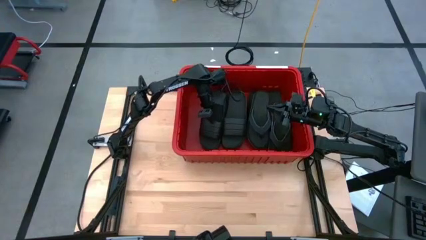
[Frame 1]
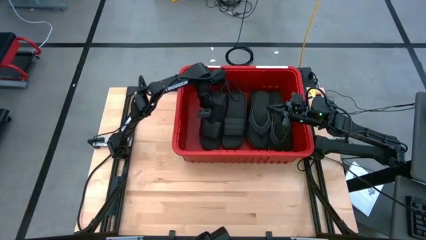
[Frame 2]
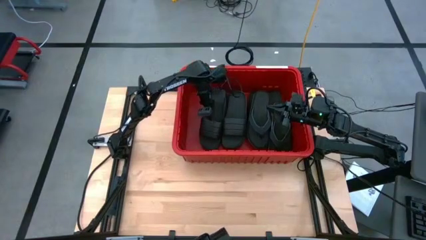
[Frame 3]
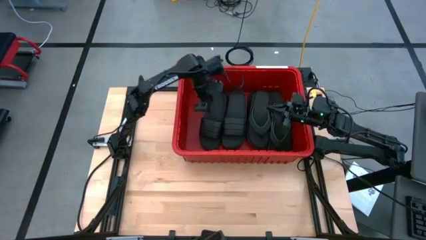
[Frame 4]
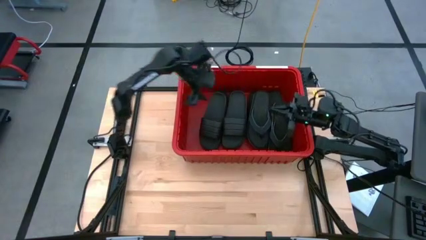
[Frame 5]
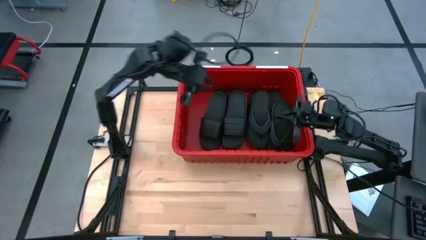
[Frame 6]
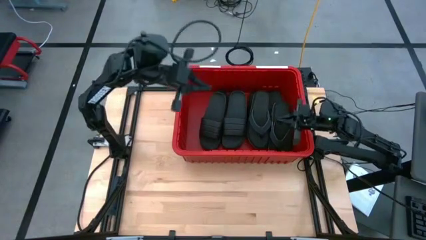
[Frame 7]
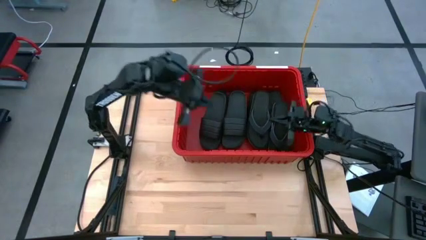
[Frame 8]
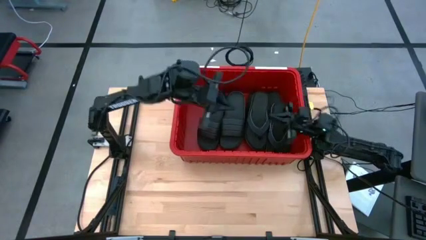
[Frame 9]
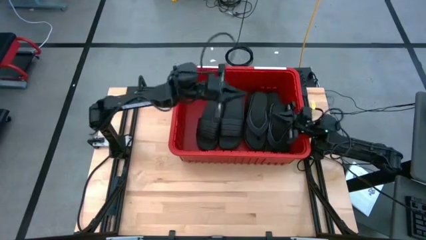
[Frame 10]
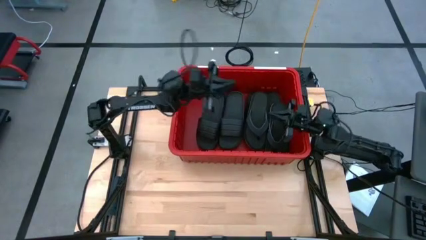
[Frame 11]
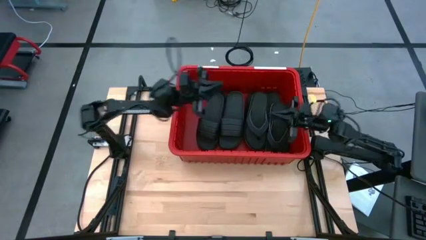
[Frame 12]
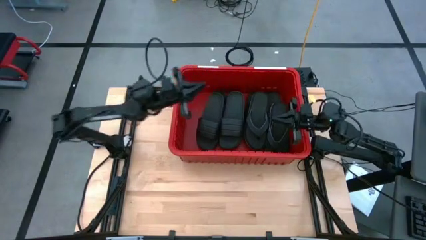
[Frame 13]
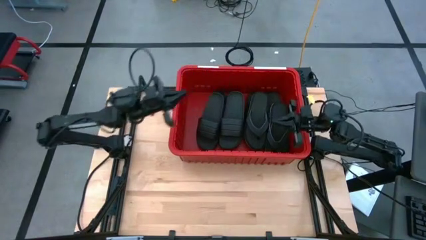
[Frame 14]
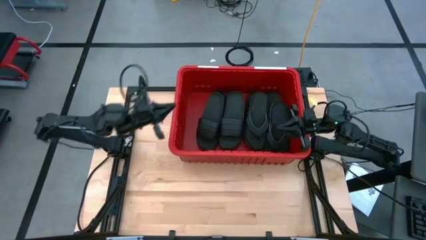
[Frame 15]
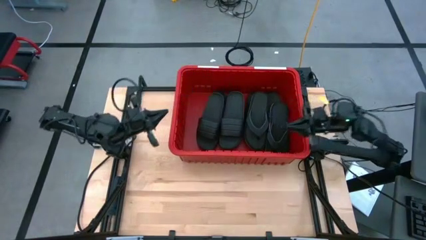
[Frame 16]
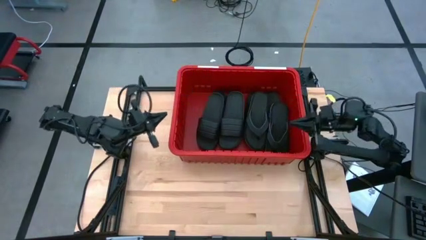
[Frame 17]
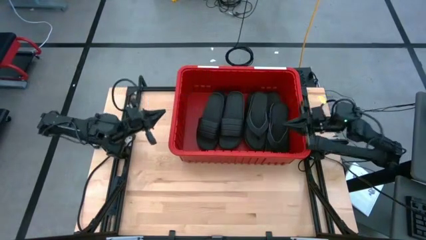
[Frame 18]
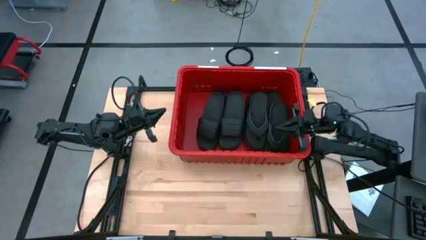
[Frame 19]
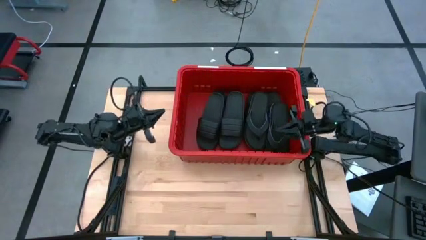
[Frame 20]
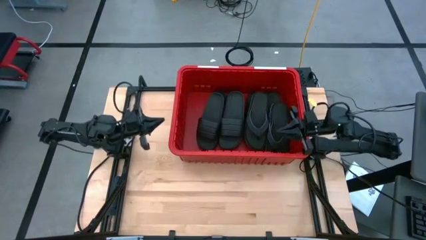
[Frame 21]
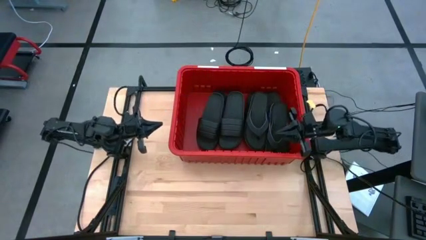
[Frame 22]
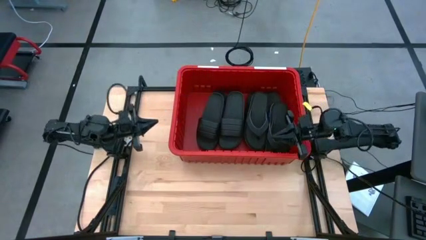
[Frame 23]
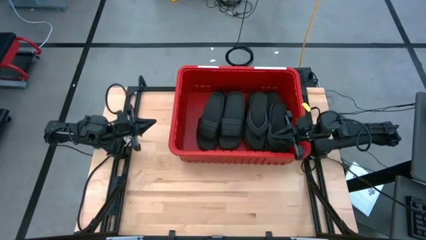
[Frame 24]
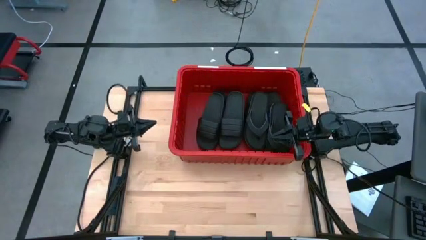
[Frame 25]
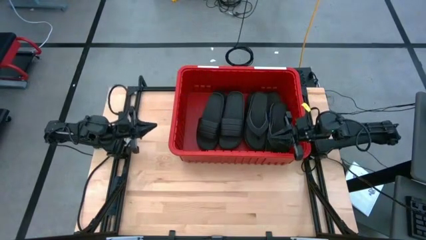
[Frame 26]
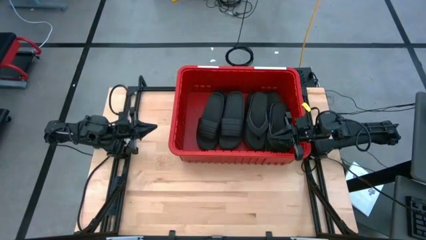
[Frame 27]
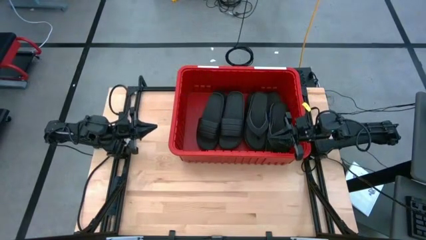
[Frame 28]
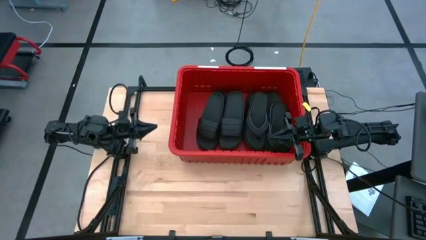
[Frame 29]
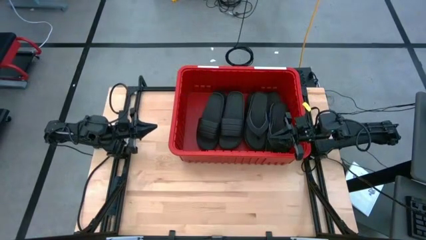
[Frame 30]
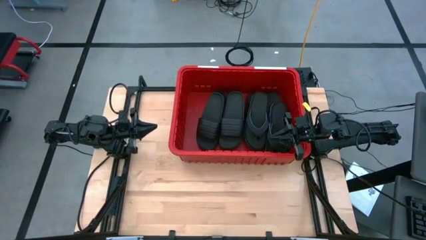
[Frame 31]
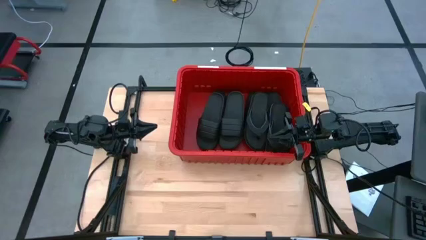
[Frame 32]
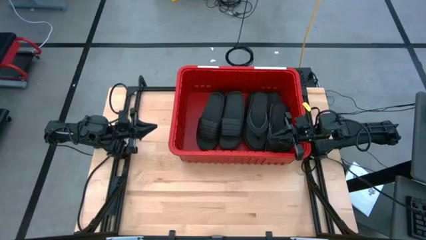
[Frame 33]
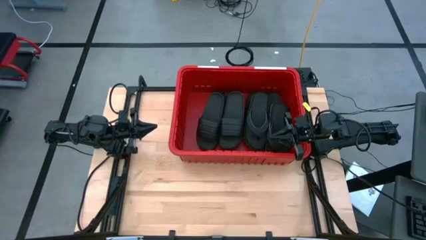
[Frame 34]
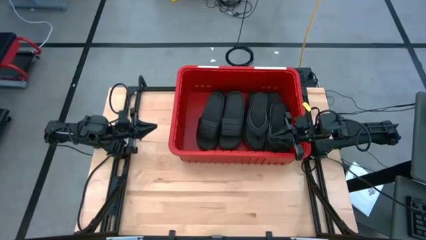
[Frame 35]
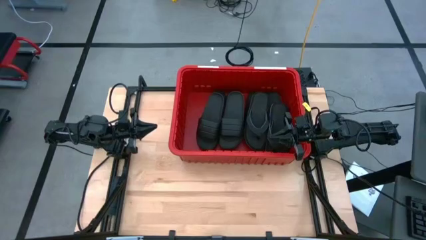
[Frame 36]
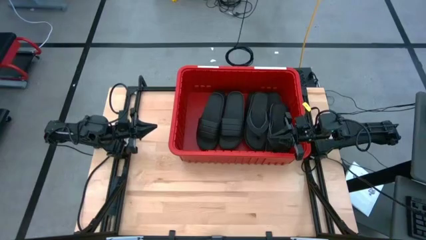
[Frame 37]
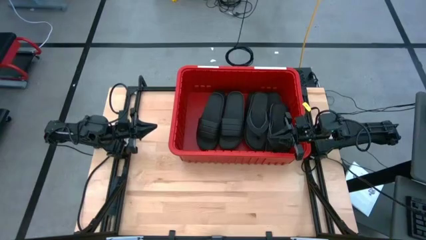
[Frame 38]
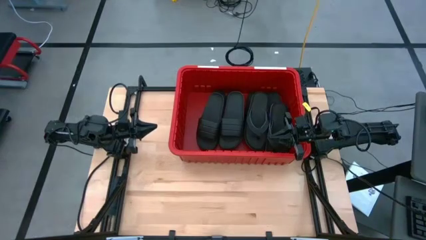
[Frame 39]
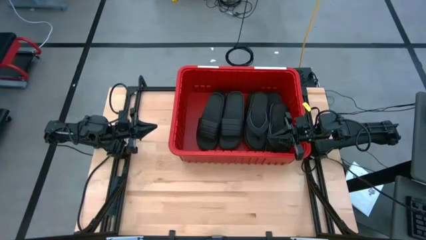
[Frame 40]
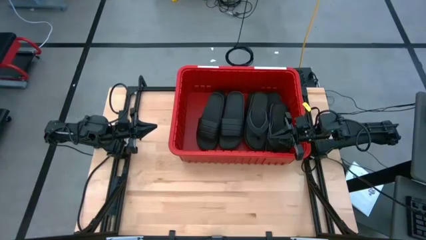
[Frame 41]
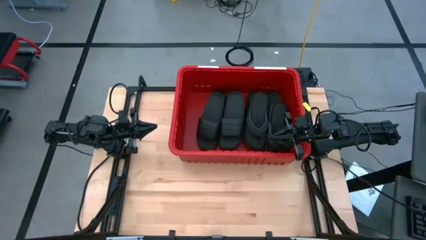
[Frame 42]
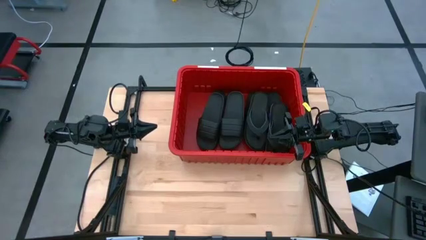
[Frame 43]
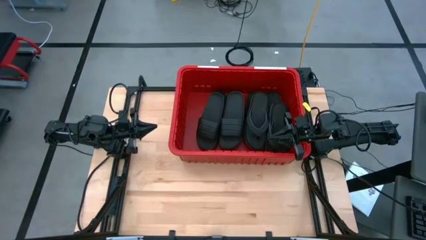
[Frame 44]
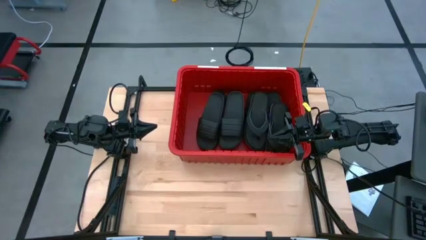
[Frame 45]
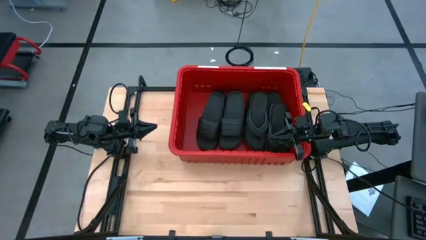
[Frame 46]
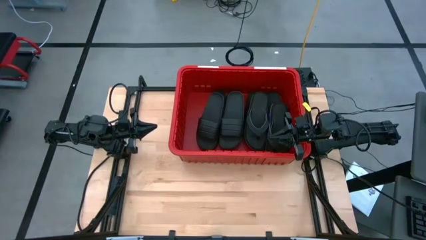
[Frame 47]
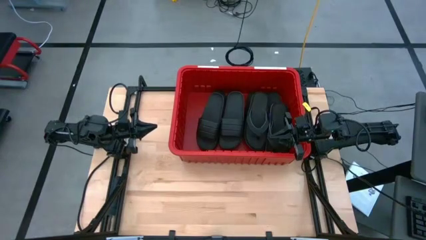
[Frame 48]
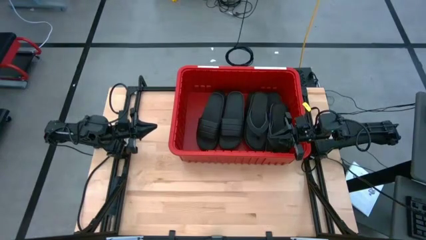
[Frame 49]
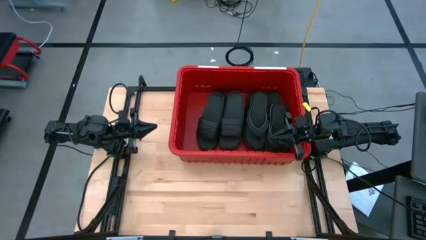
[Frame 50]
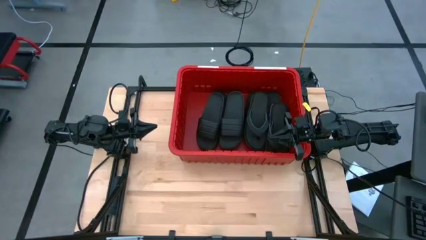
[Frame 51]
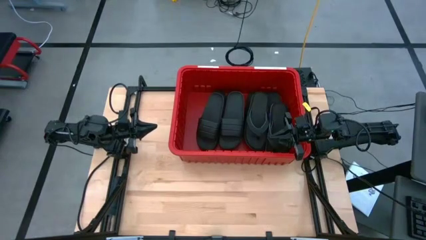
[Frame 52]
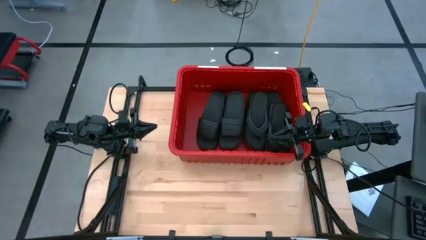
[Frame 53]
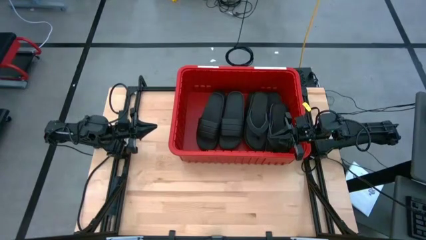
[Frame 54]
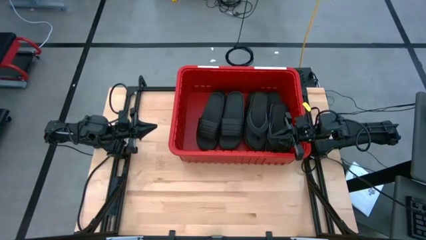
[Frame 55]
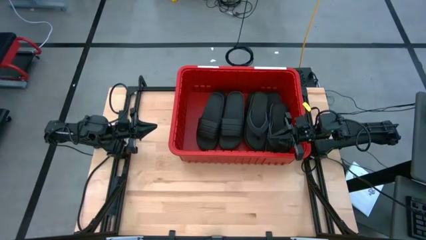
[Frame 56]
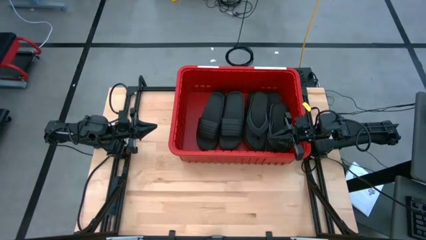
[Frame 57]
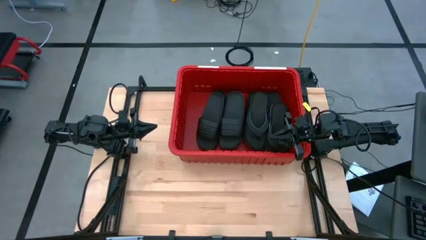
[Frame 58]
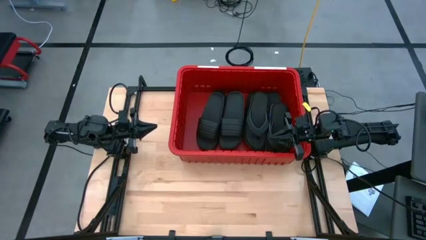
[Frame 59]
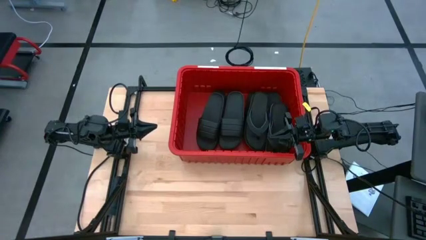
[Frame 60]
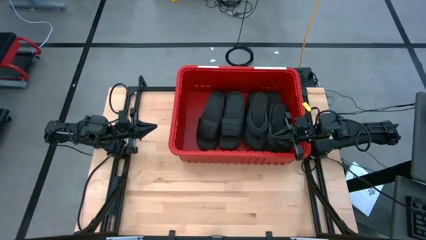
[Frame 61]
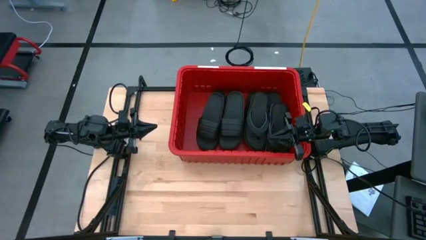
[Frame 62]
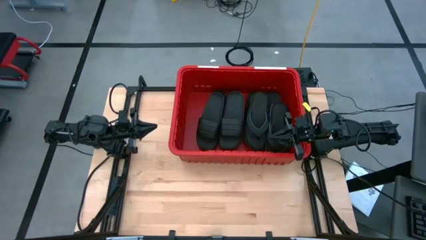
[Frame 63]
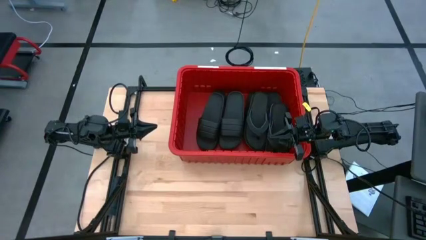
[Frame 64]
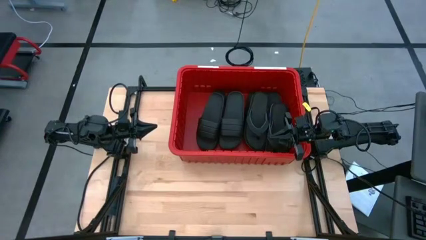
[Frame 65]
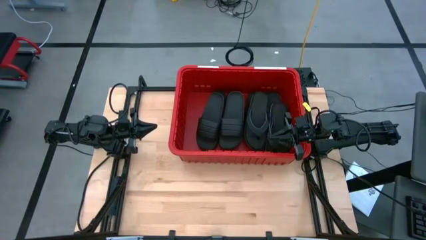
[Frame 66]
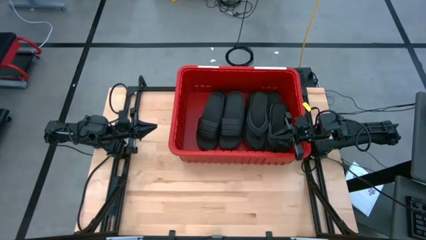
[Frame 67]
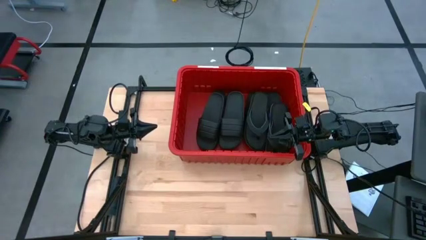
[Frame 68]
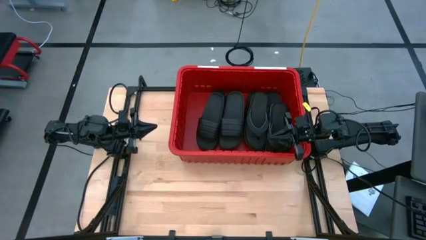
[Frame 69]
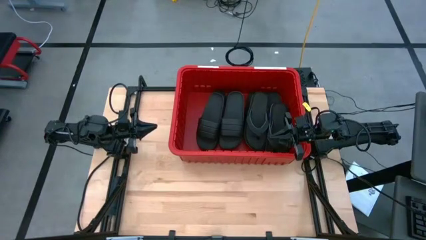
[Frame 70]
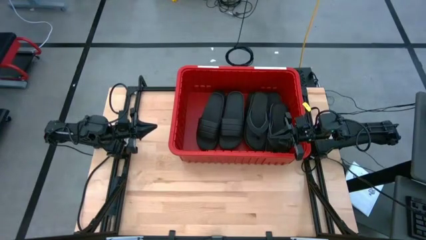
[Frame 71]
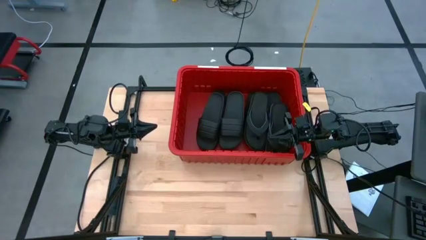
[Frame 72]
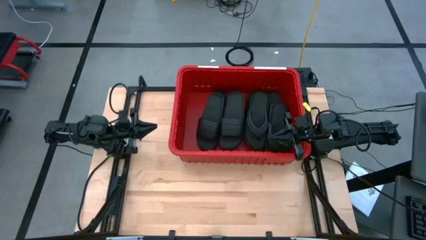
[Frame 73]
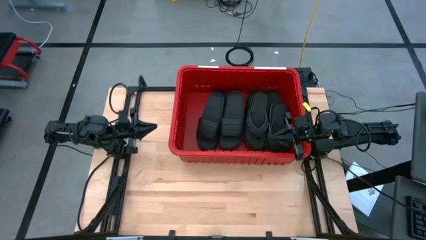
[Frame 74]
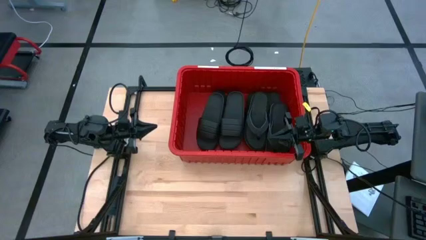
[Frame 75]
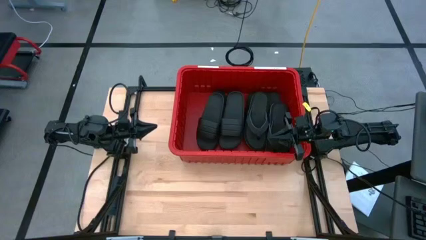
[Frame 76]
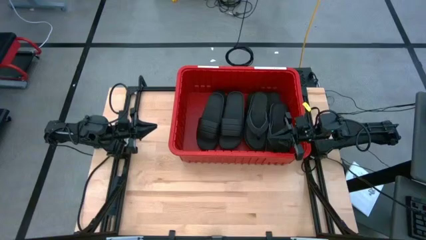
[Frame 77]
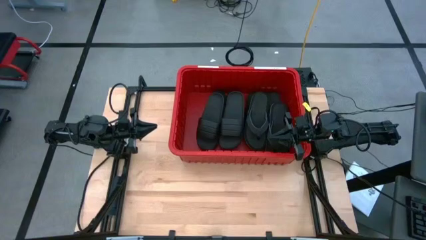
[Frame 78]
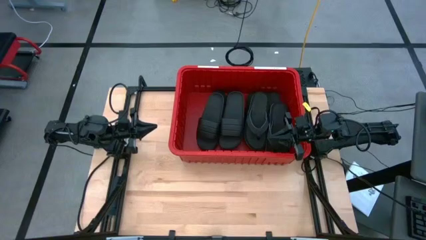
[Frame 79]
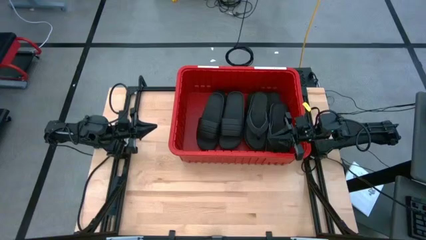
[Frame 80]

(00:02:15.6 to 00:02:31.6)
Task: Pick and place slides into bin
Return to Home Position
